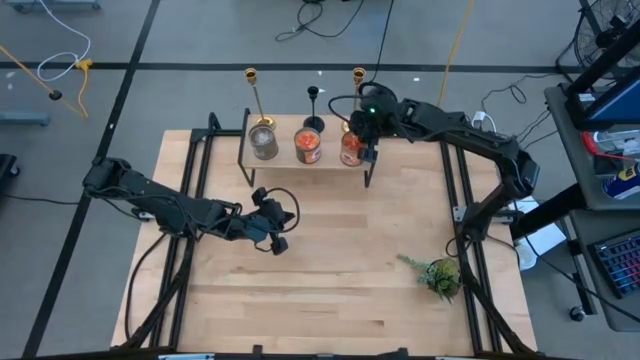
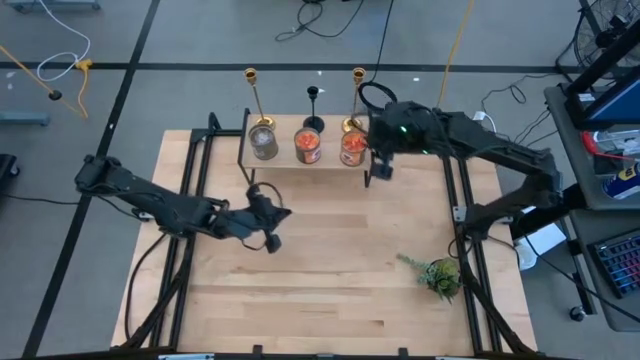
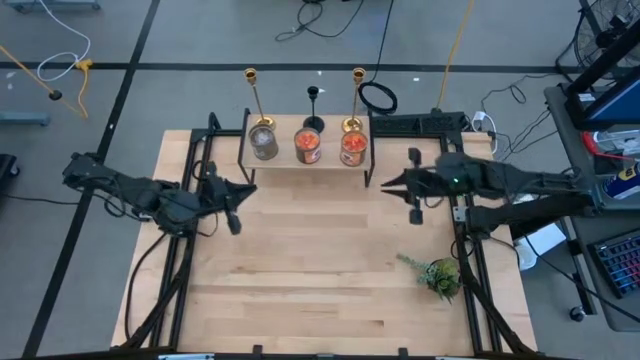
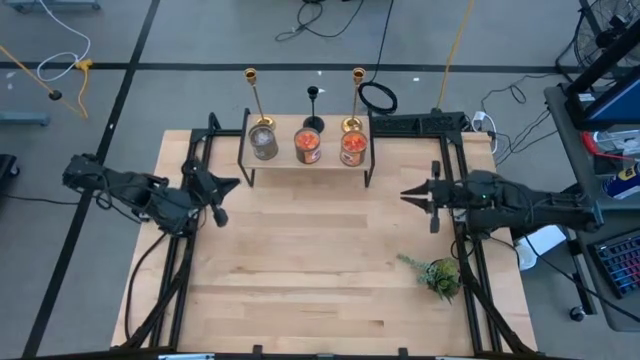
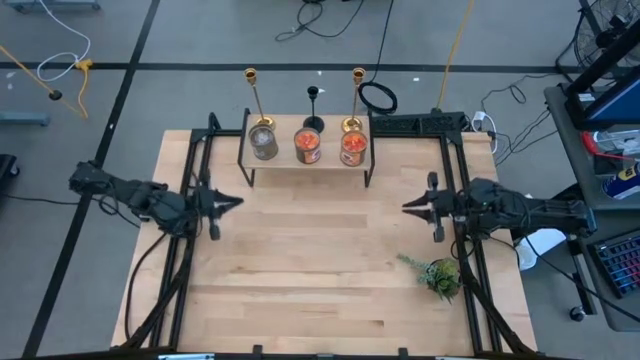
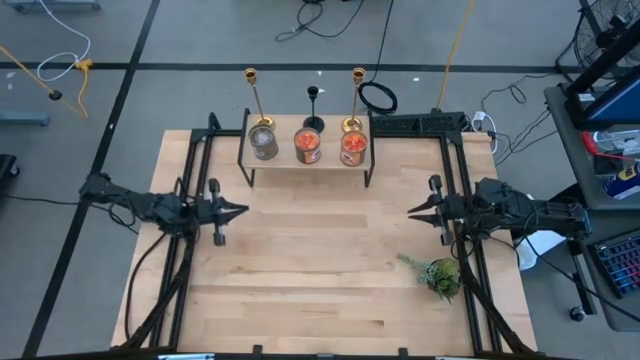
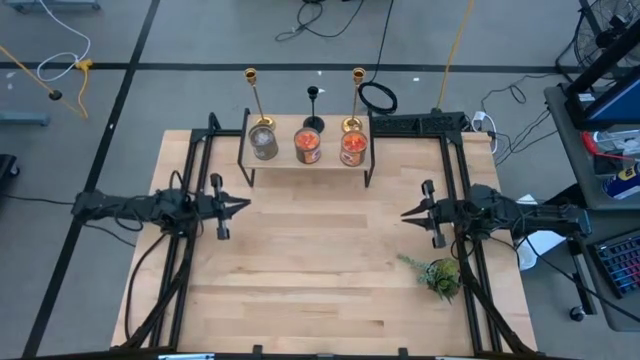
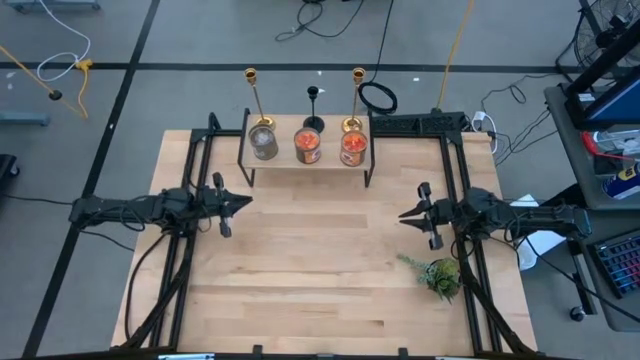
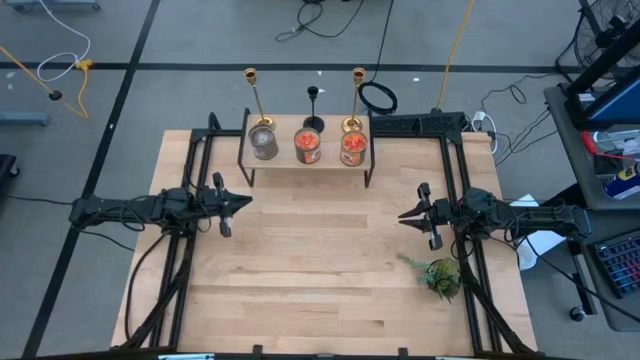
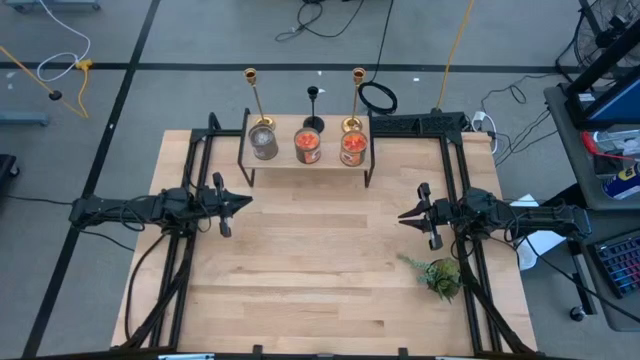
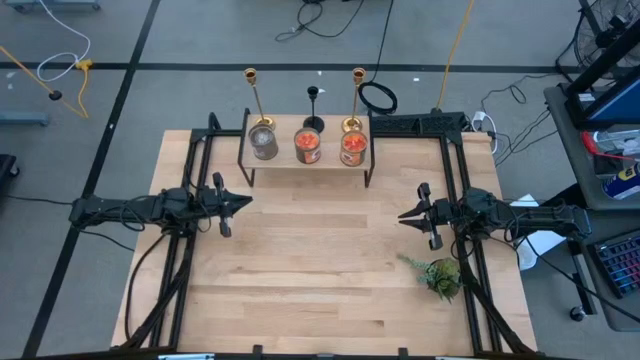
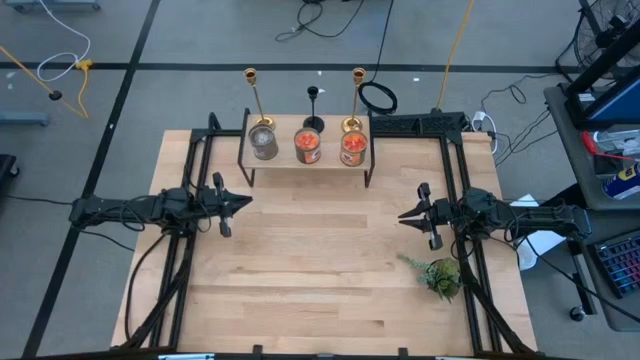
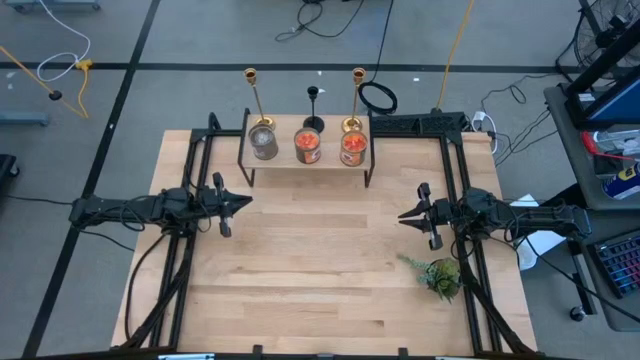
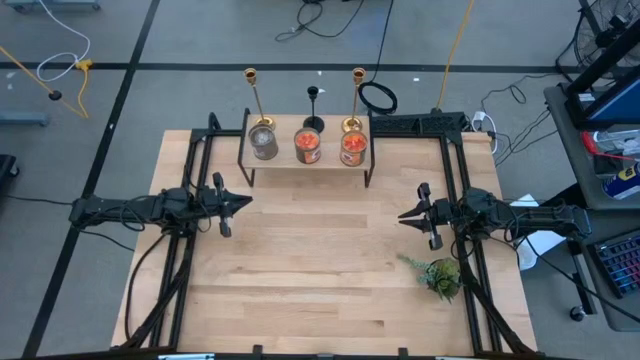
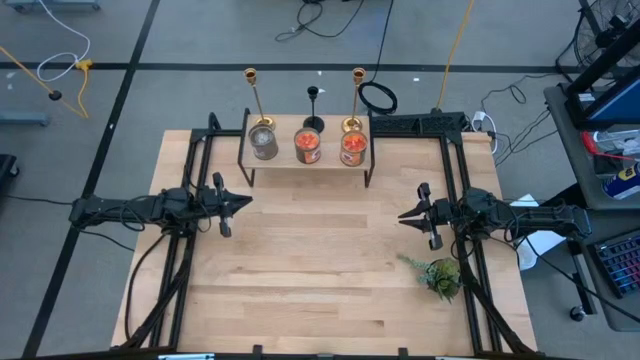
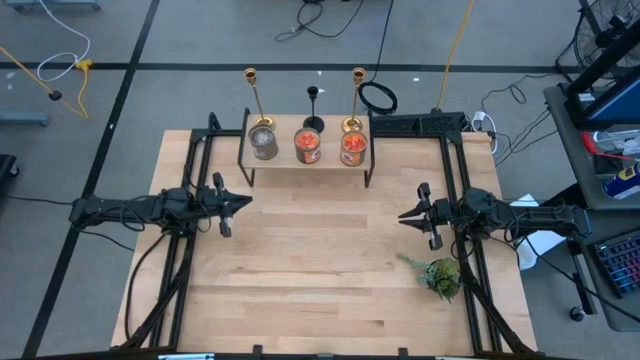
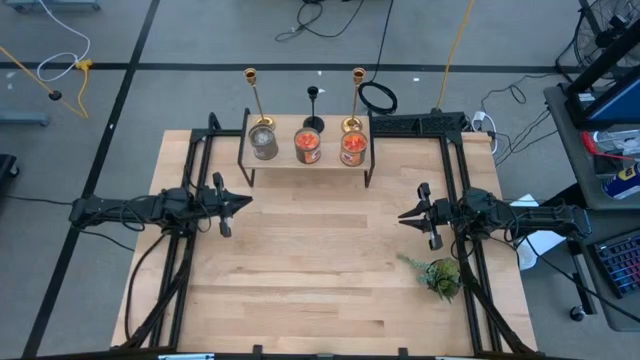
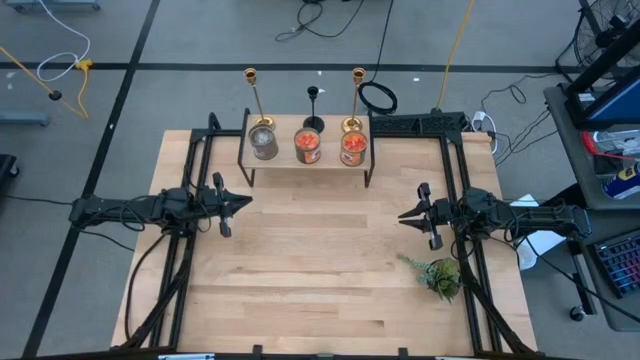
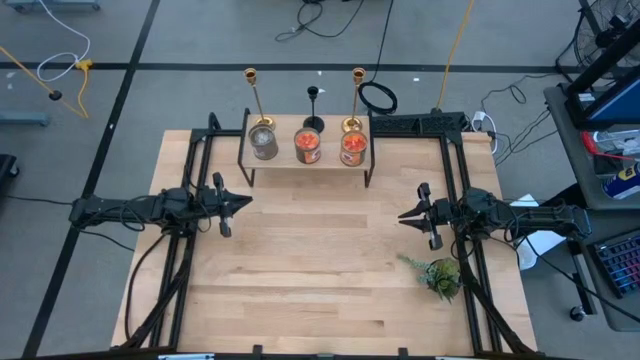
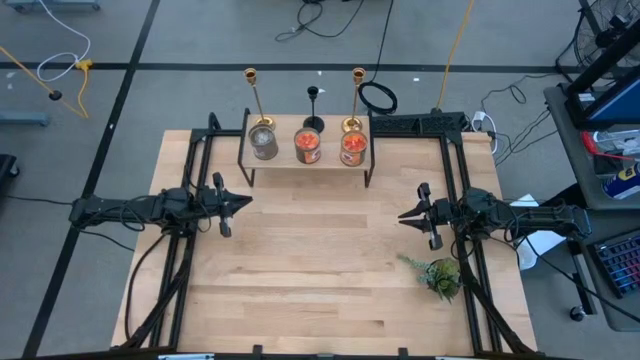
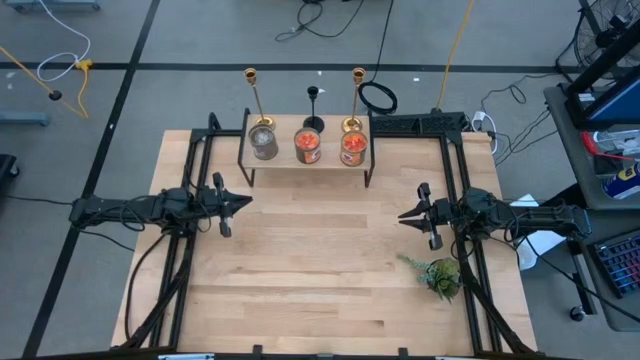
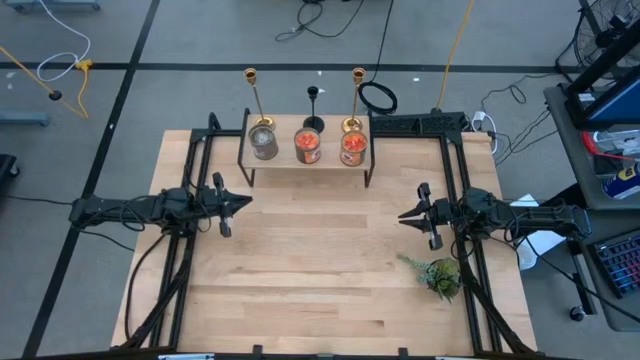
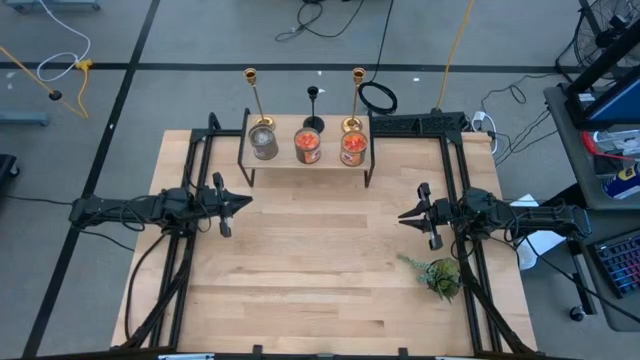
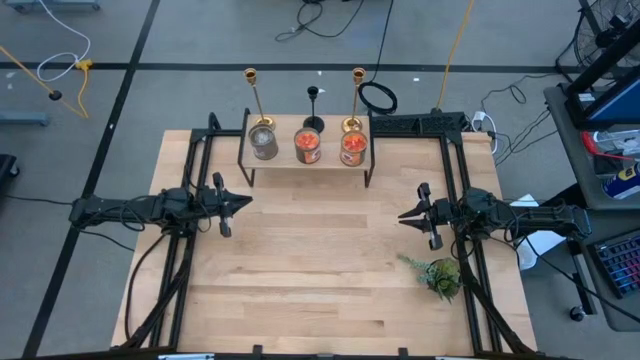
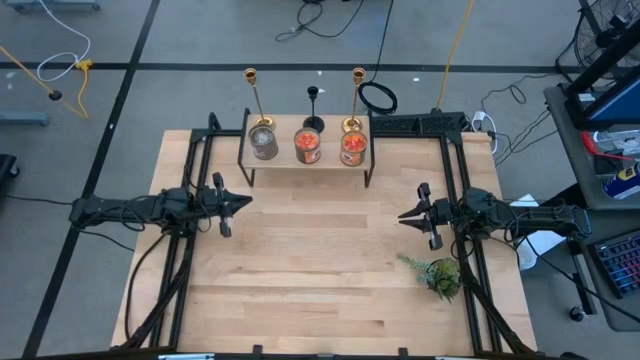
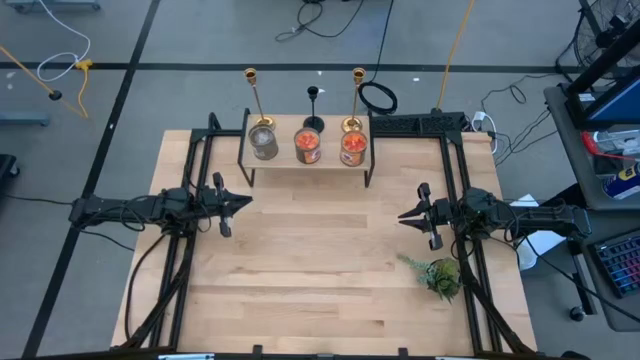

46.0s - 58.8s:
Task: Pick & Place candle stick holders
Return to Home Position
